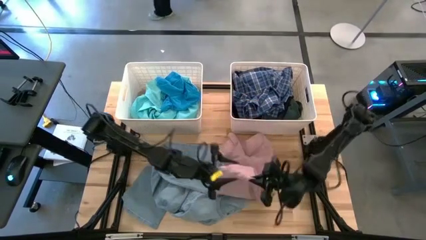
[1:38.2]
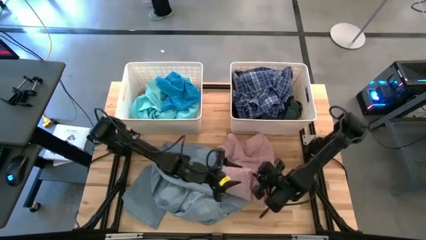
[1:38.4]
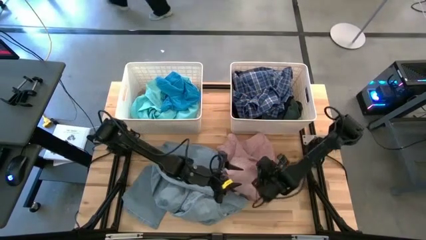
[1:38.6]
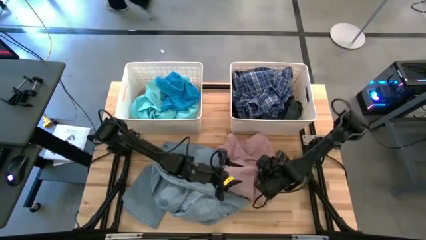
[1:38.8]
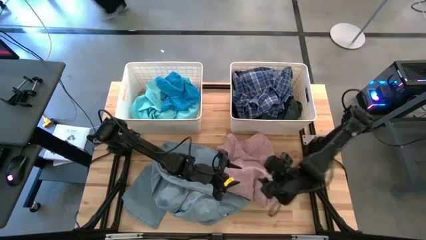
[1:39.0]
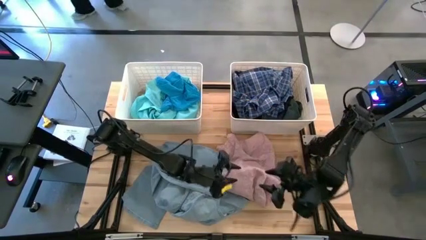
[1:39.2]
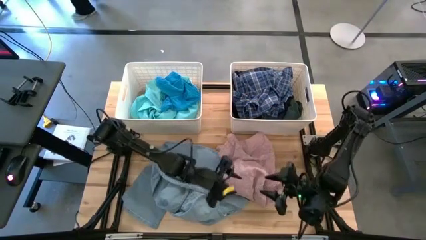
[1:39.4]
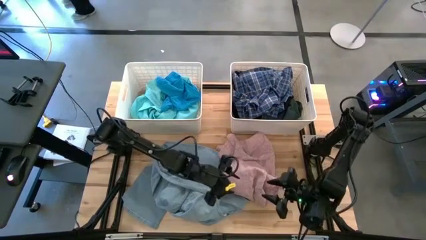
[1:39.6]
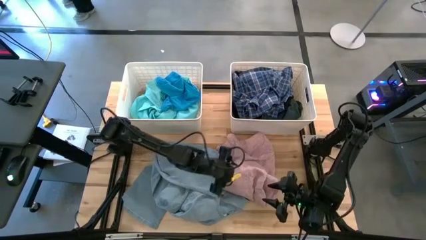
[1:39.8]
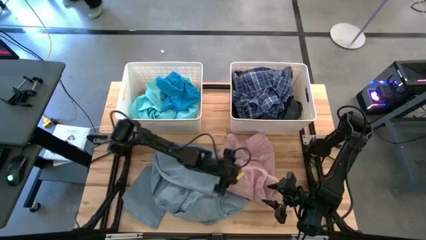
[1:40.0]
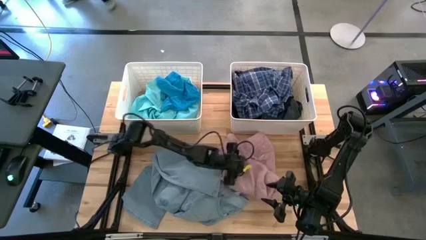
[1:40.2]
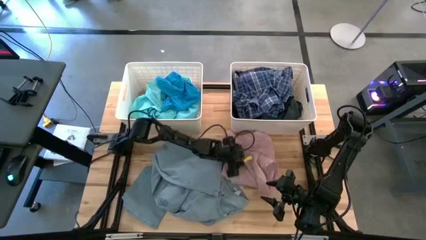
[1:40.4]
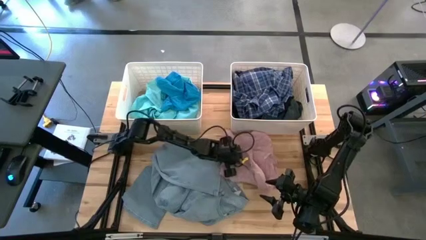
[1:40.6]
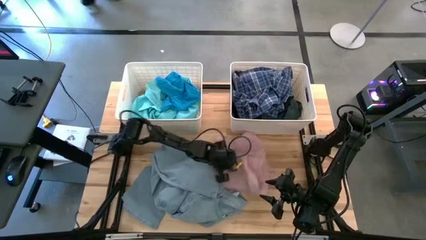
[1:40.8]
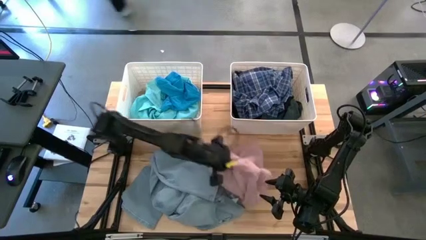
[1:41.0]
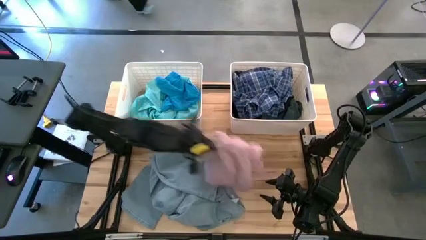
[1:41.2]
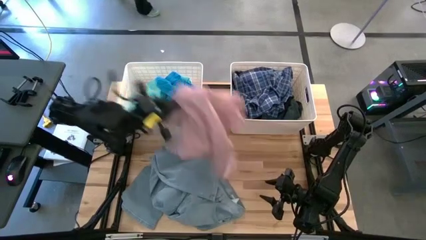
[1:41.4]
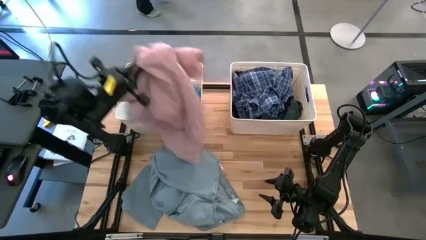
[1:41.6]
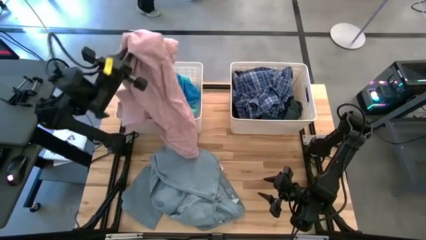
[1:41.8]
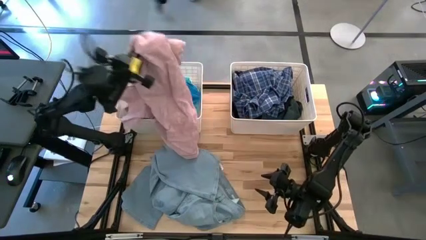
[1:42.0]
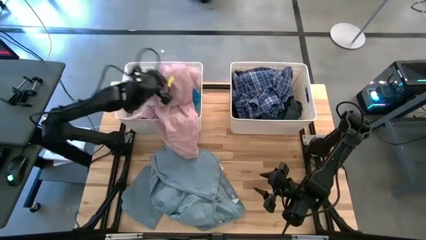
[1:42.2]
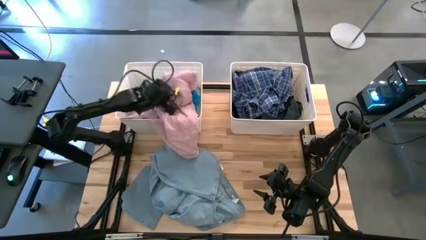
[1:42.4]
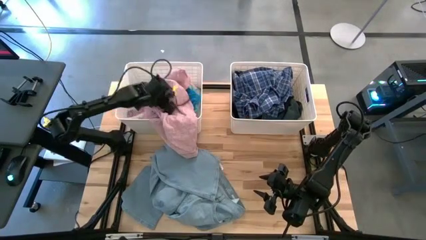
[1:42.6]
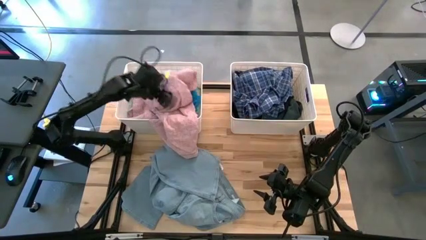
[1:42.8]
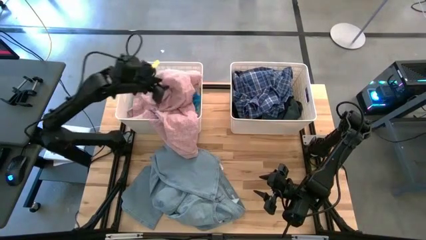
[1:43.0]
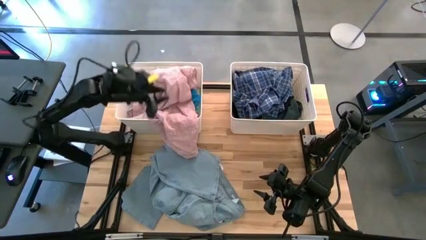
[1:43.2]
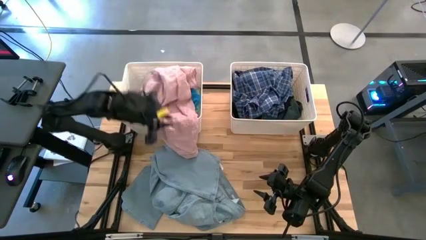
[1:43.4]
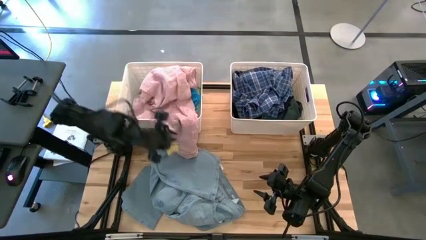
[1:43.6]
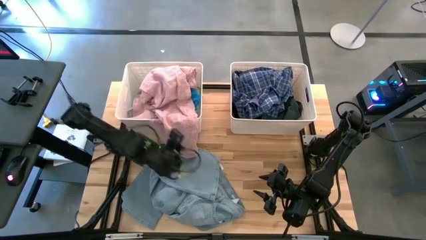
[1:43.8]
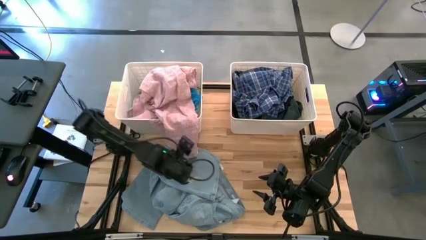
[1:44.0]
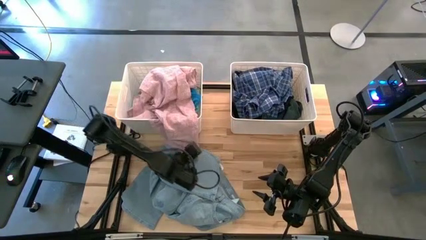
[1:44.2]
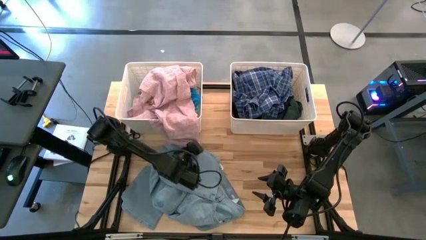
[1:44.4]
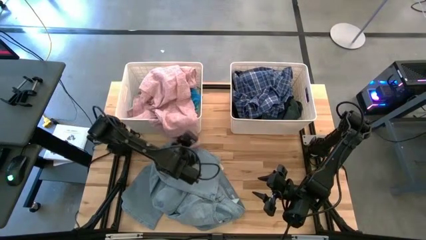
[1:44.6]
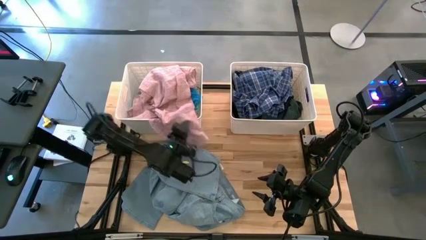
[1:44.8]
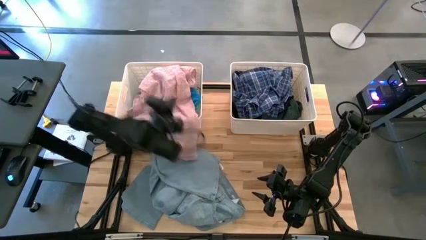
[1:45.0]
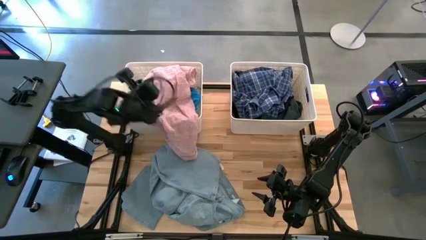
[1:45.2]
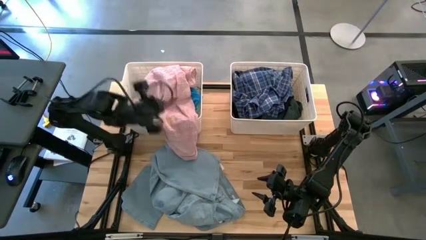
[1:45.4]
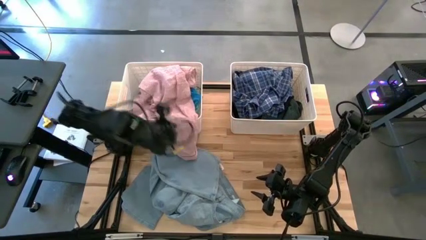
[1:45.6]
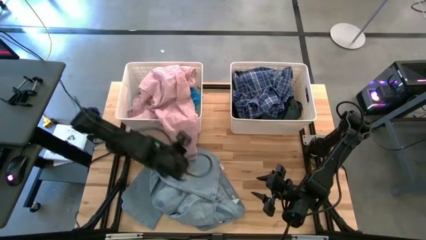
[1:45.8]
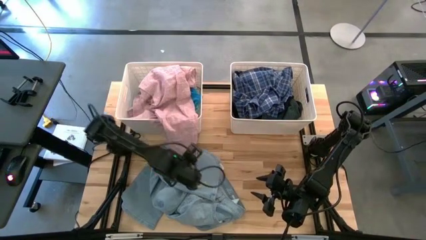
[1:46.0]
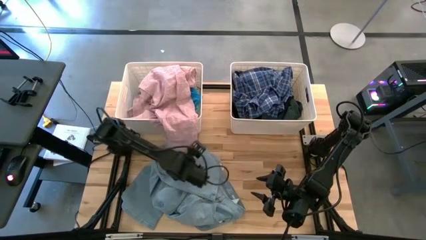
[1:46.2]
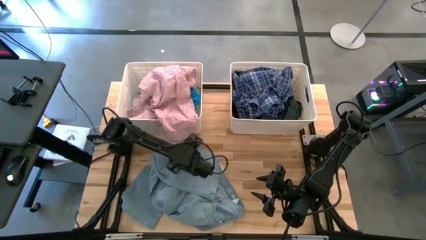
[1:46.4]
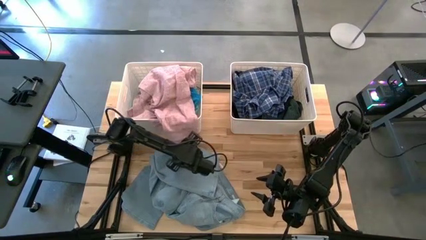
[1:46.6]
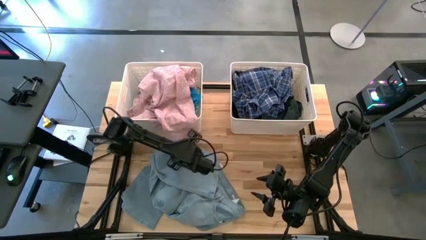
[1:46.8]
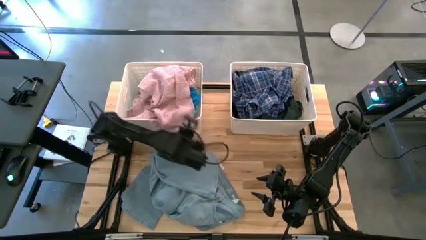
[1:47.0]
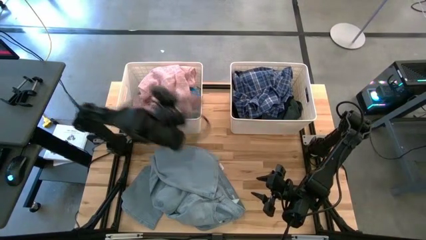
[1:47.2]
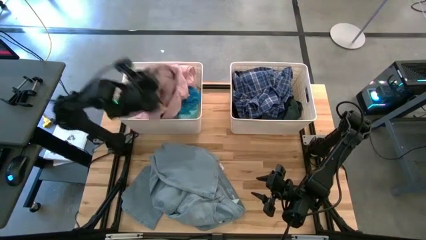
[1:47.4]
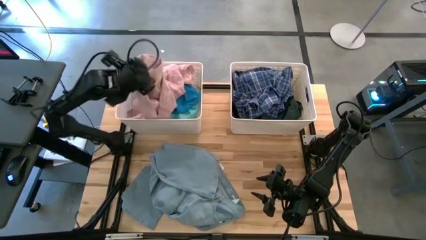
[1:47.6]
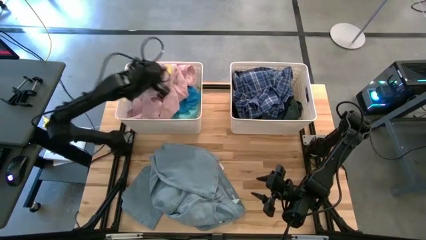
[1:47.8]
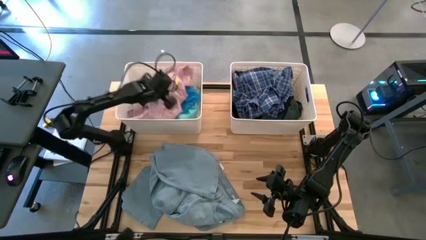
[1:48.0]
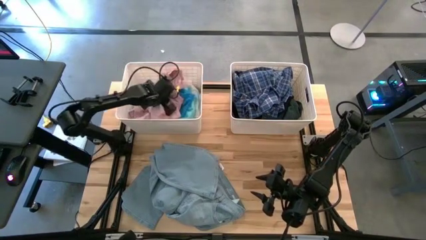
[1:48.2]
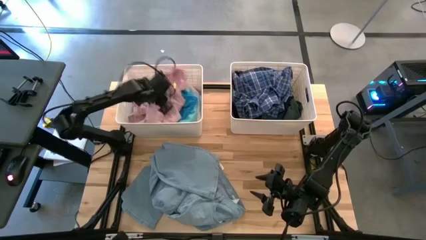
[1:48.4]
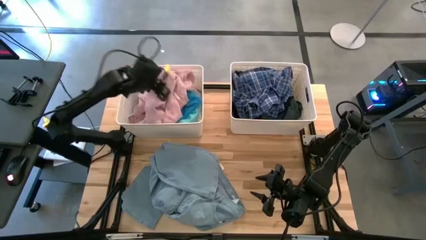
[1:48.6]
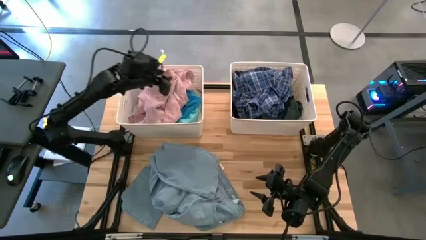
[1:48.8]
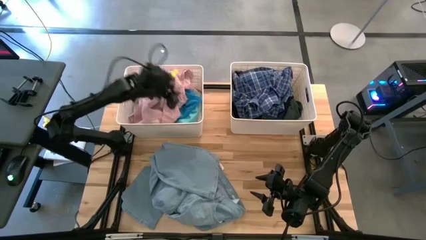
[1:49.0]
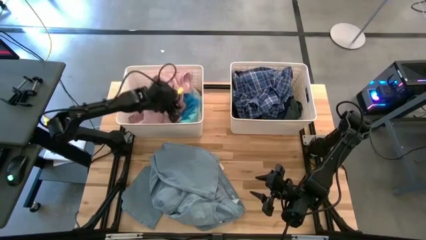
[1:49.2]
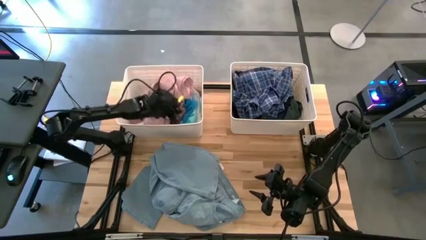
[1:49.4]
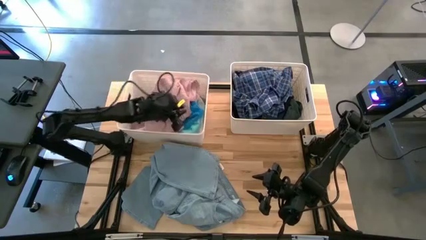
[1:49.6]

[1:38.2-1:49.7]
Task: Sort clothes
Put the pink polo shirt into the left white bin

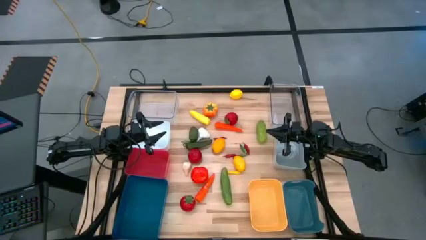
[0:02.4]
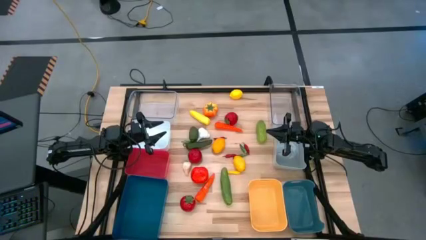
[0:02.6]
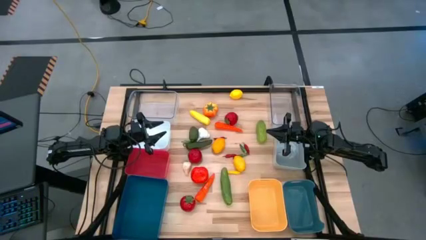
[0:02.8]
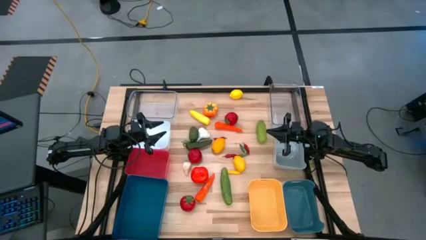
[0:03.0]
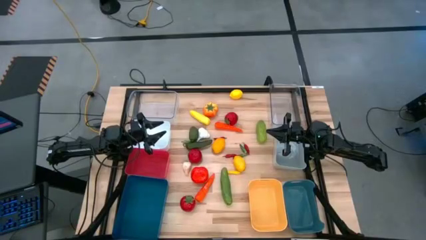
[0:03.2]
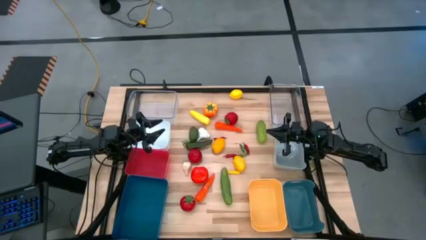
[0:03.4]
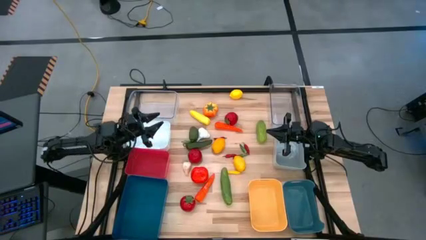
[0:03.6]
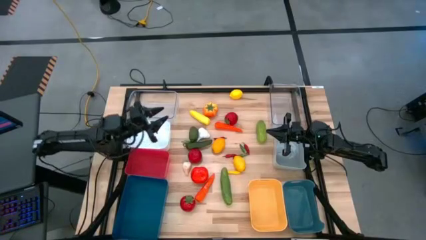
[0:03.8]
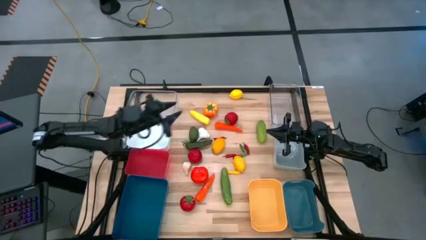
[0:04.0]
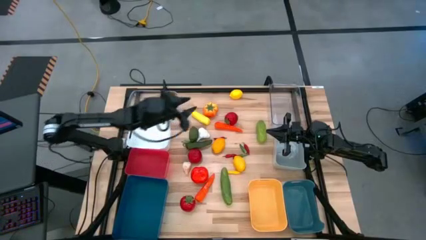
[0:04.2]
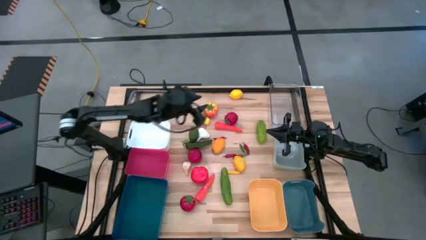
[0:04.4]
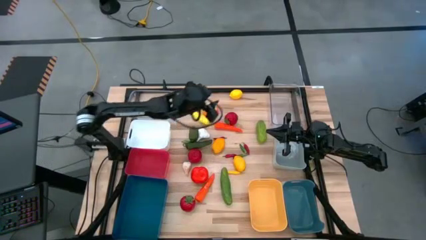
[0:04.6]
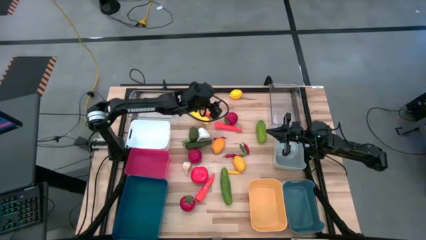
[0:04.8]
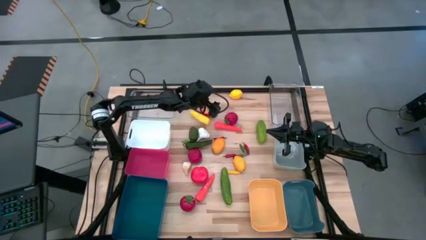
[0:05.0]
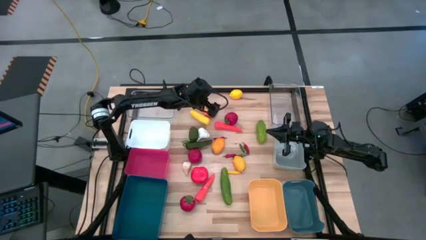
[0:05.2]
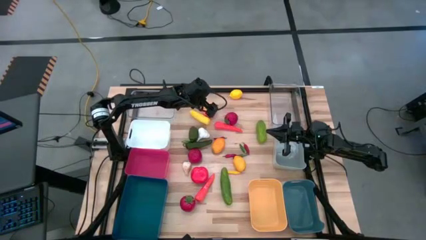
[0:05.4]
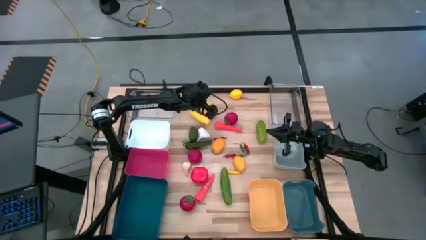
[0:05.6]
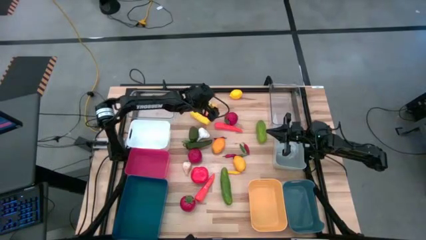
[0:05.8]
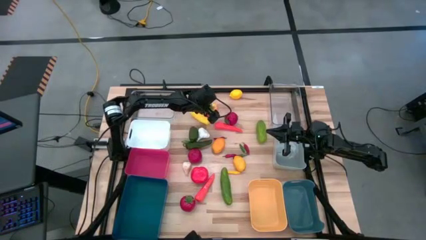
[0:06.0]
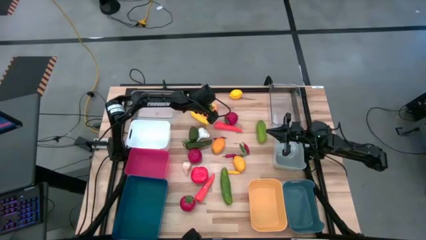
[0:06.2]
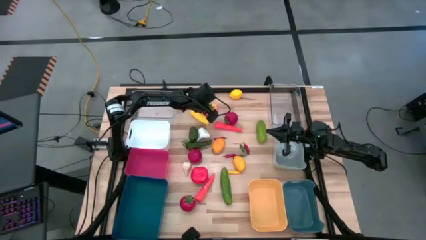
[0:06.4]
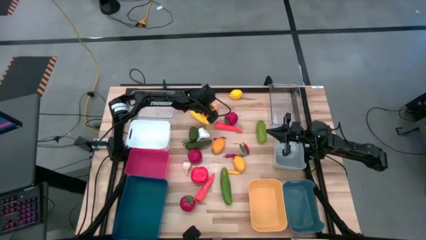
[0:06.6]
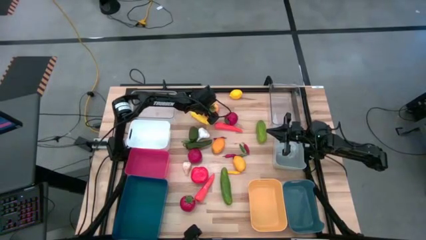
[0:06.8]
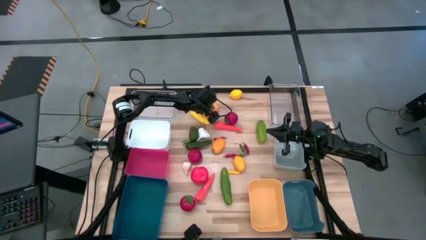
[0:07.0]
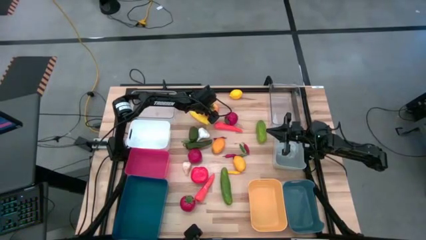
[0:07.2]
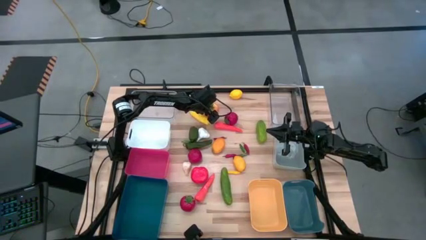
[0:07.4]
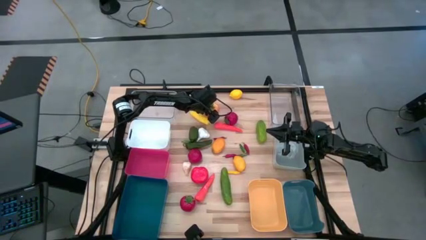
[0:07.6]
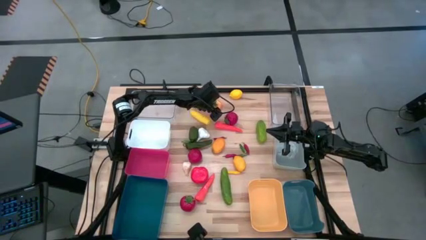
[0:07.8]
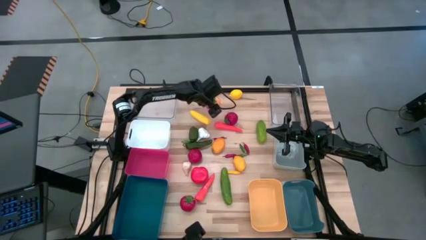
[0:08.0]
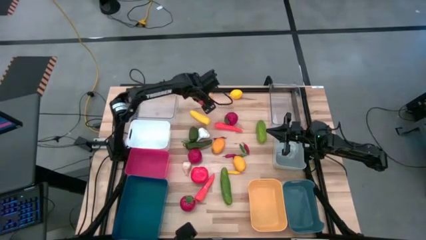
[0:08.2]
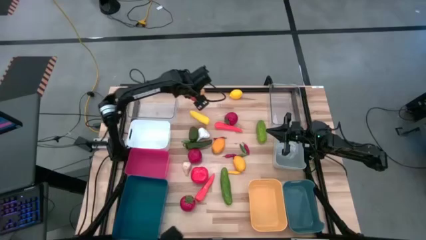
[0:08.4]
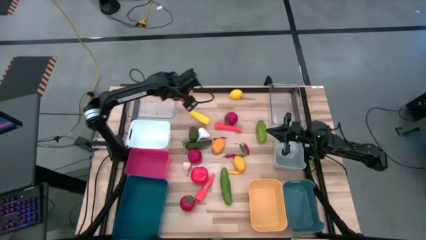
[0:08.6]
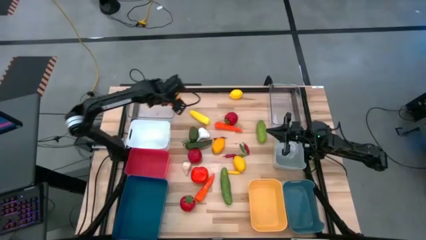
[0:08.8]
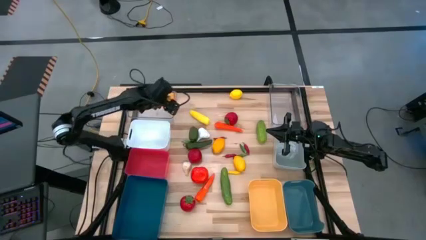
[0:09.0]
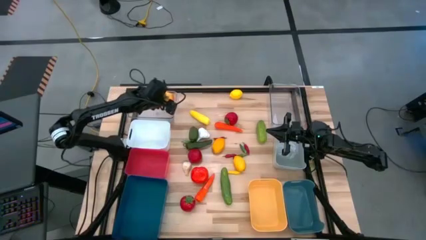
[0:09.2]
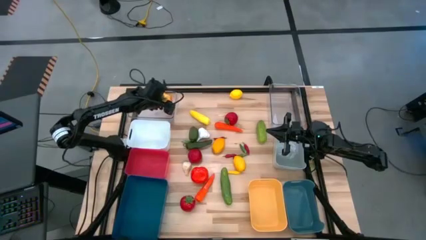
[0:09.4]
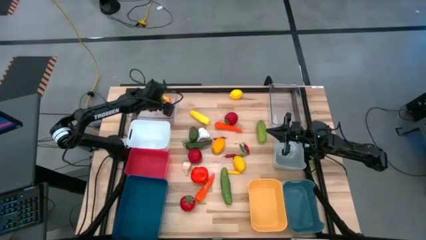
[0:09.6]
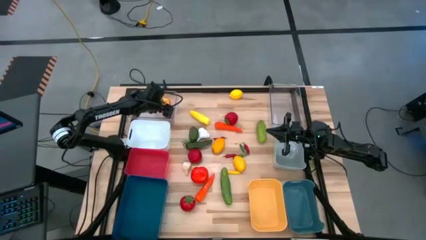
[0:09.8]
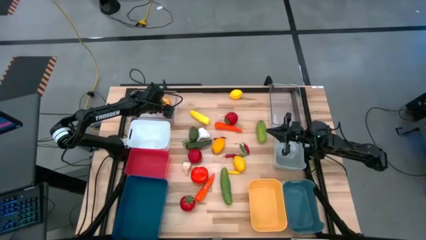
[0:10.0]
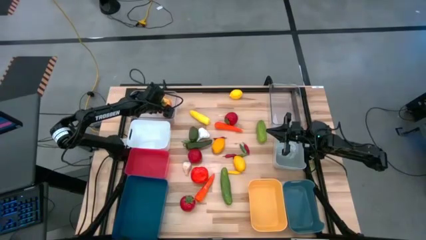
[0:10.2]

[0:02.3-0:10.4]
Task: Sort produce into baskets
Put the top orange tomato into the left transparent bin
